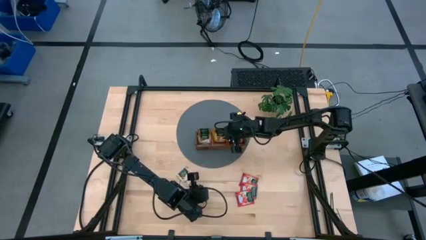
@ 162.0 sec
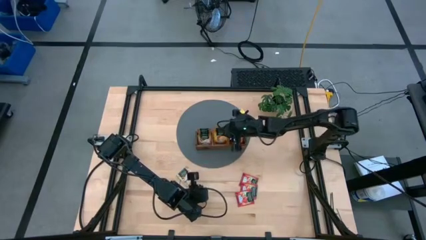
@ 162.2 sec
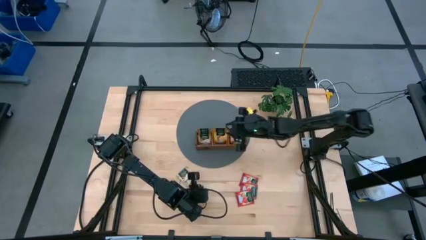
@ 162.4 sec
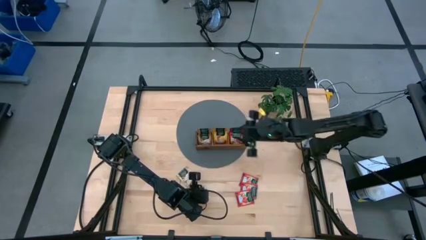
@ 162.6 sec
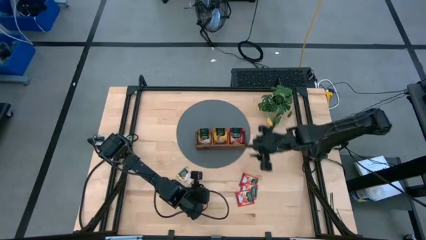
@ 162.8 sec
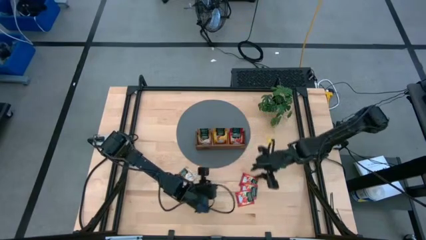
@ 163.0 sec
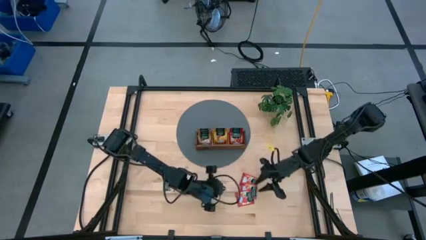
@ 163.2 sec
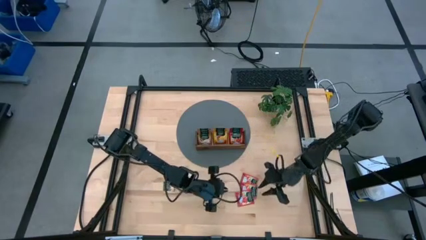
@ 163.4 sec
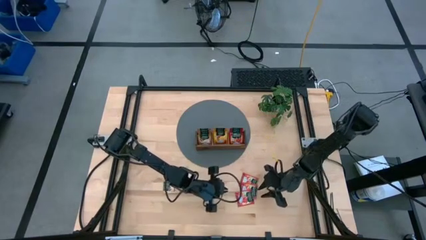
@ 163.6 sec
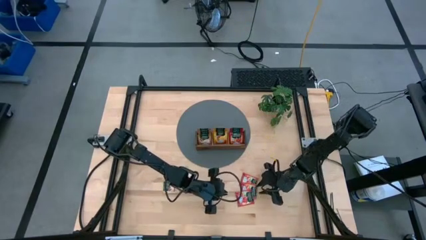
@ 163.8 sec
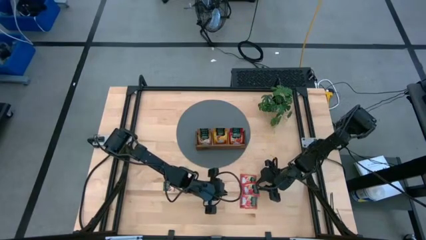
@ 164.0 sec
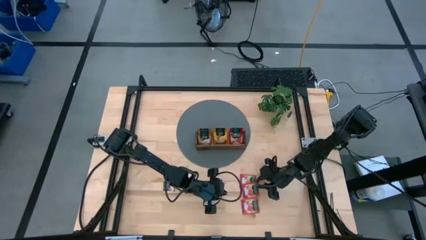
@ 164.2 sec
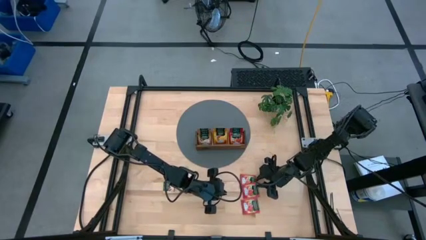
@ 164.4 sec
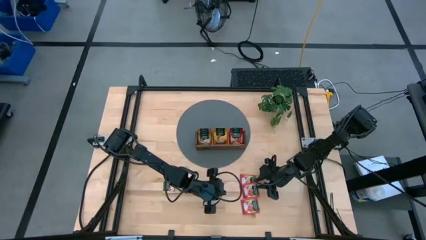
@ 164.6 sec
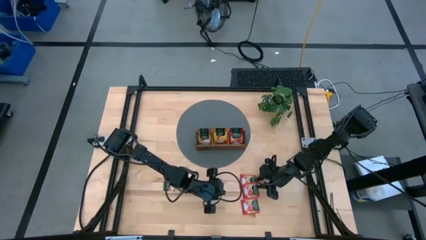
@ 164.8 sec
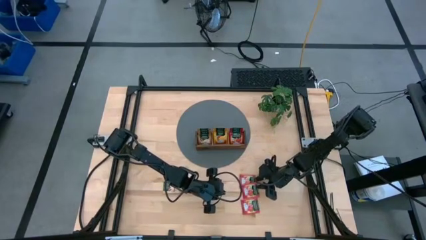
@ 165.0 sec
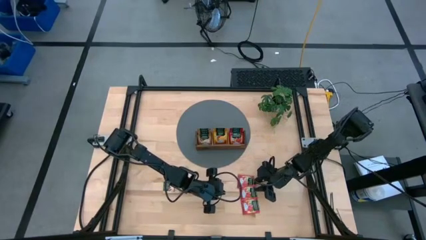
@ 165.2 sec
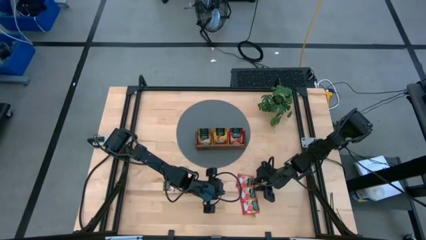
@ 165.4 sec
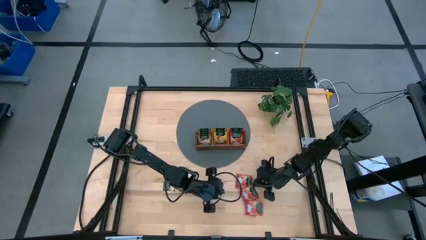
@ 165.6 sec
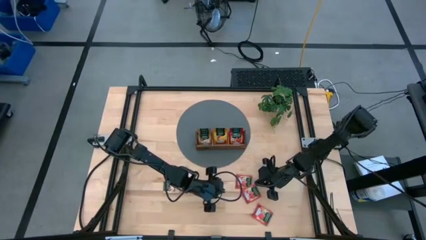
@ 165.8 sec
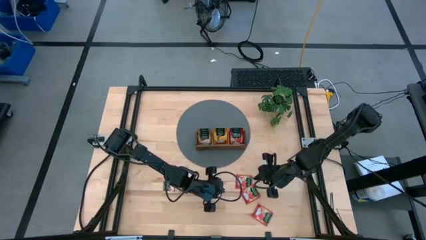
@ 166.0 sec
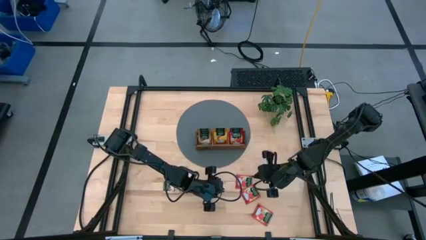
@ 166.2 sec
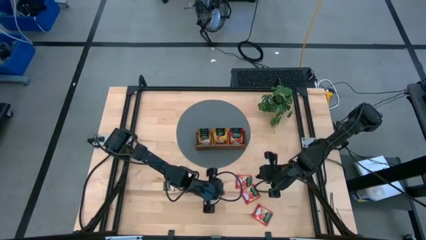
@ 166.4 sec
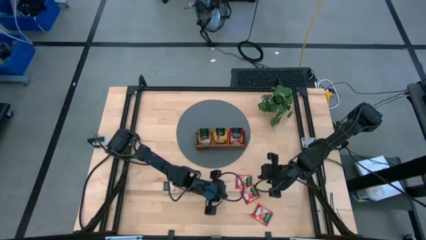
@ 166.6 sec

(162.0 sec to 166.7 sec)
Task: Pick & Place Tea
Put the red tea bag into the right section of the wooden organizer

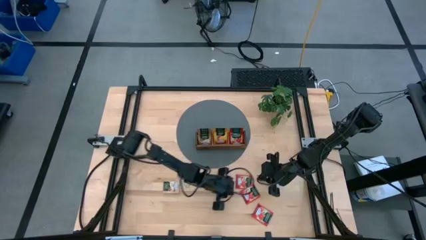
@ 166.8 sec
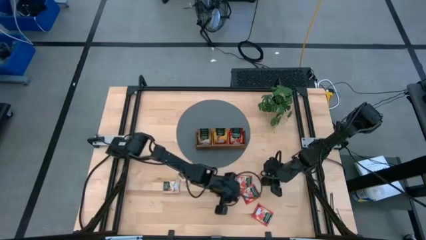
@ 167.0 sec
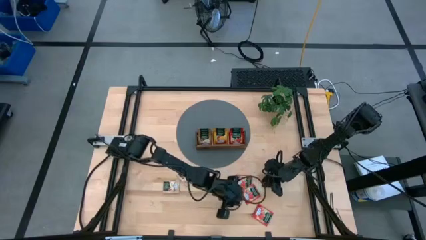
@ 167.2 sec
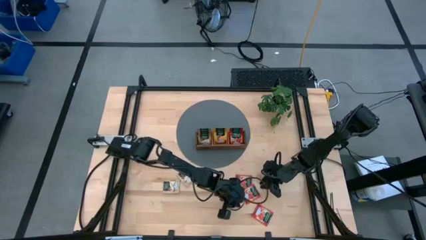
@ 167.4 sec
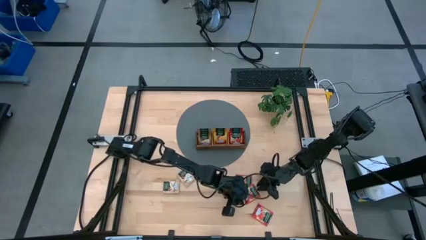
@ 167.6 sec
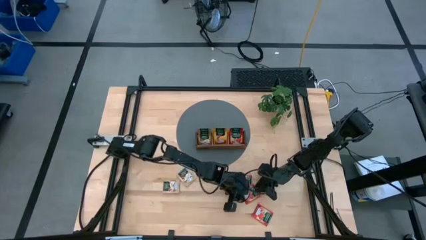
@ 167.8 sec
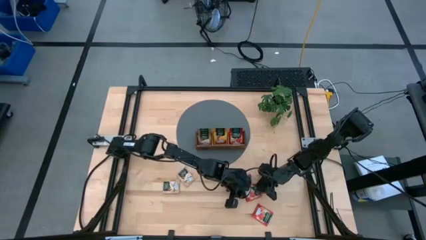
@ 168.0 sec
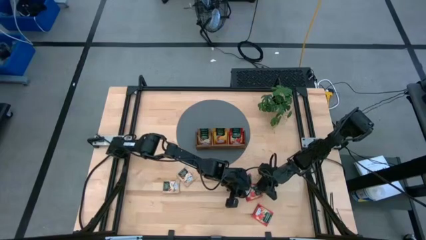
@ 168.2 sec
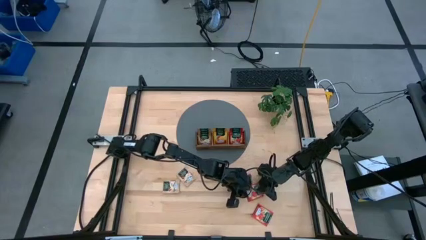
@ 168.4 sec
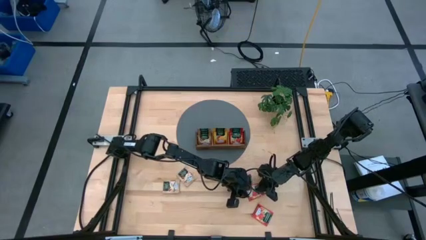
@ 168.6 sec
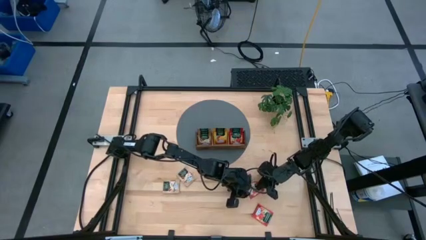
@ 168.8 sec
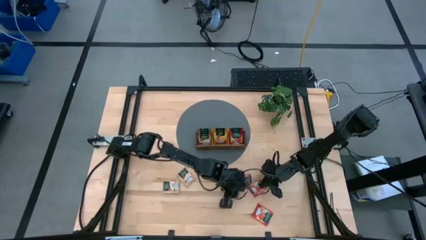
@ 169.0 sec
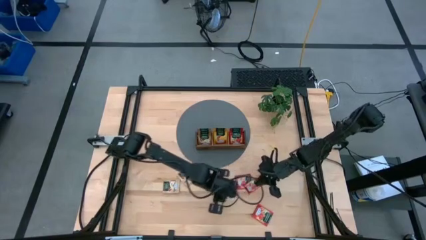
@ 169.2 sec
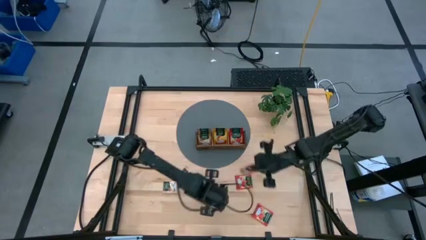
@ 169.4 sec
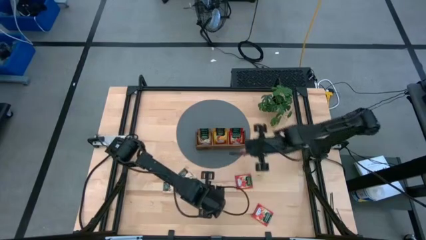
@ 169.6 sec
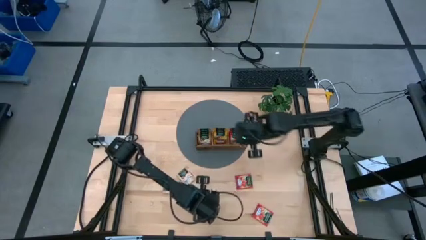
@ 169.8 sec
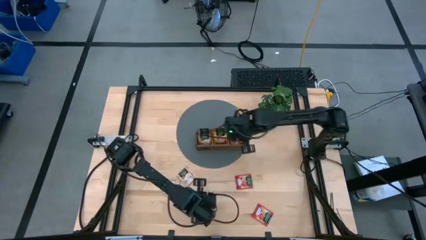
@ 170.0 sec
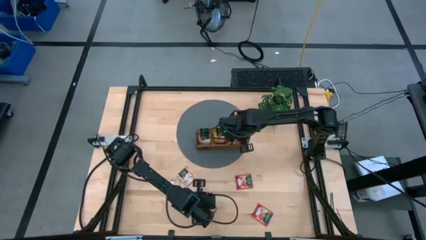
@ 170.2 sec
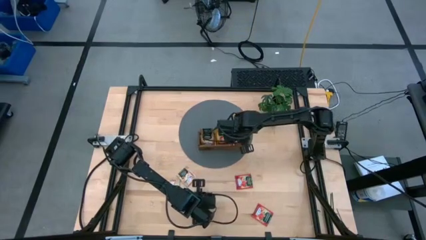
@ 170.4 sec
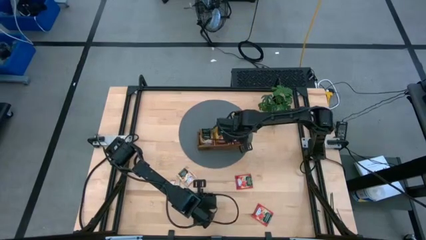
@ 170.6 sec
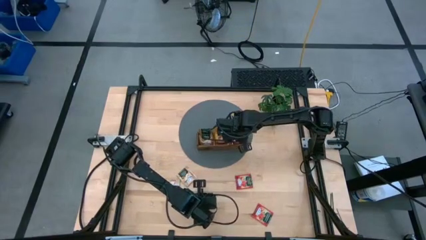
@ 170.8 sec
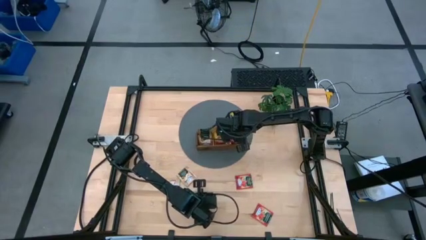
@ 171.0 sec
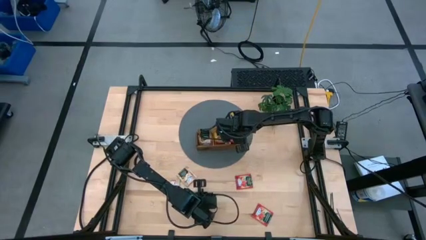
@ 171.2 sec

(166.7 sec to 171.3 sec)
Put the red tea bag into the right section of the wooden organizer

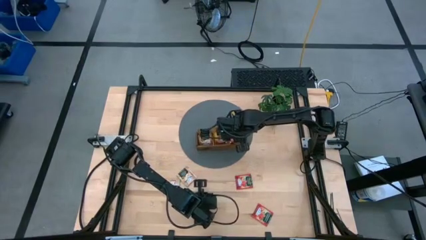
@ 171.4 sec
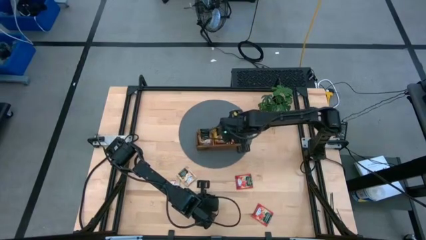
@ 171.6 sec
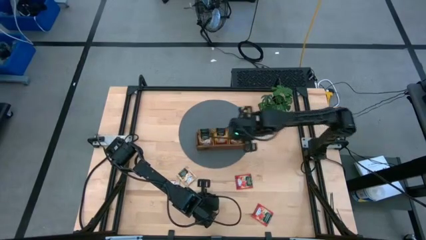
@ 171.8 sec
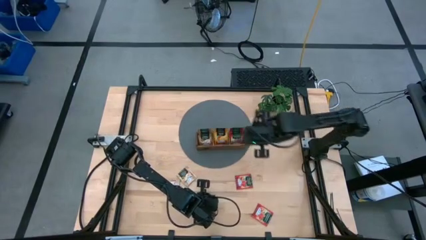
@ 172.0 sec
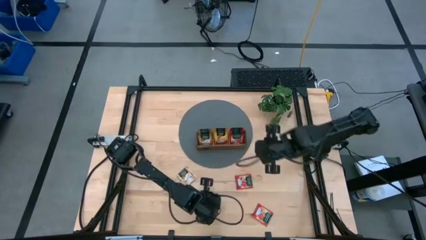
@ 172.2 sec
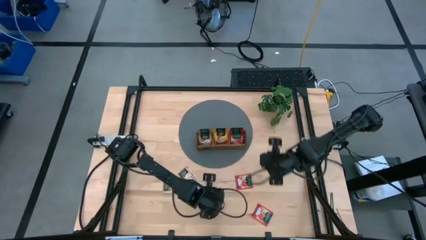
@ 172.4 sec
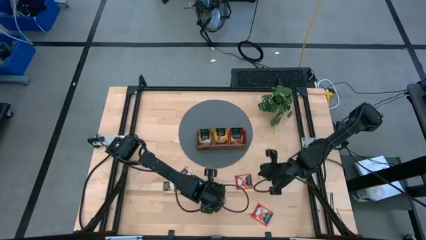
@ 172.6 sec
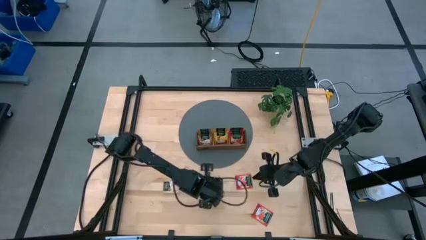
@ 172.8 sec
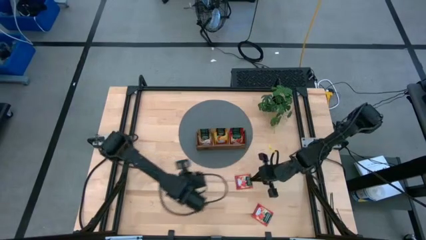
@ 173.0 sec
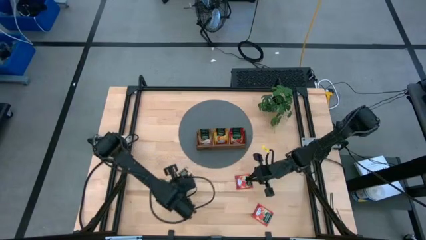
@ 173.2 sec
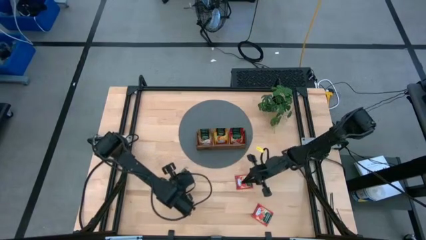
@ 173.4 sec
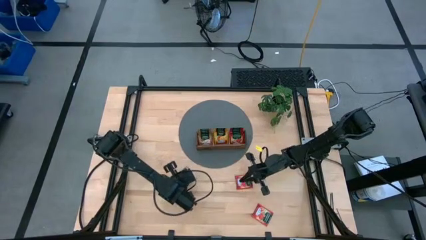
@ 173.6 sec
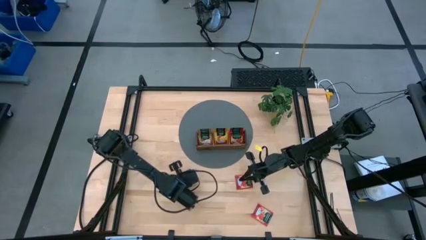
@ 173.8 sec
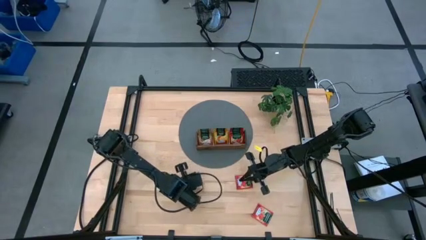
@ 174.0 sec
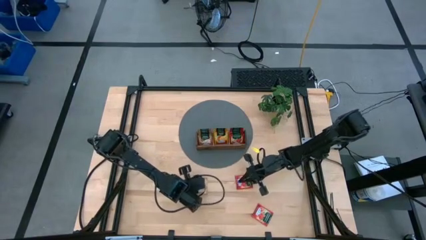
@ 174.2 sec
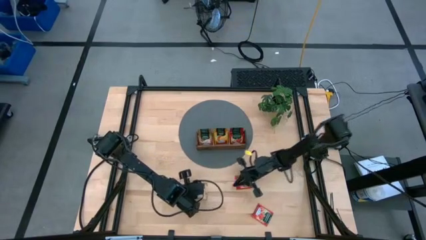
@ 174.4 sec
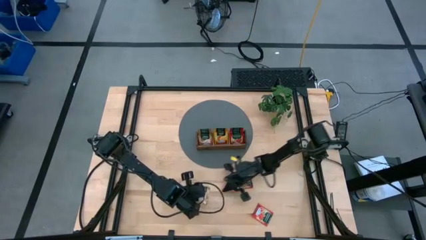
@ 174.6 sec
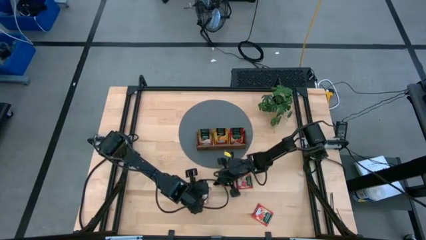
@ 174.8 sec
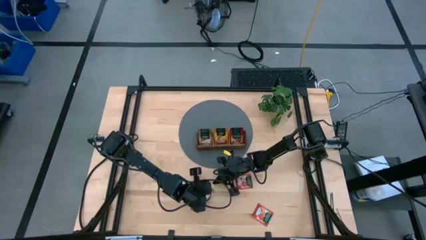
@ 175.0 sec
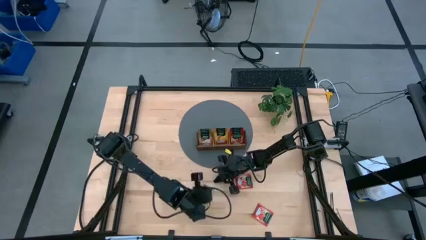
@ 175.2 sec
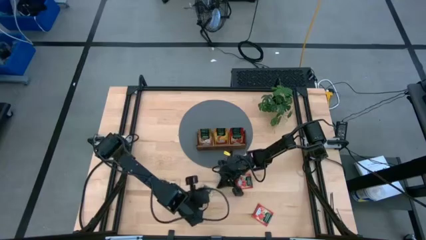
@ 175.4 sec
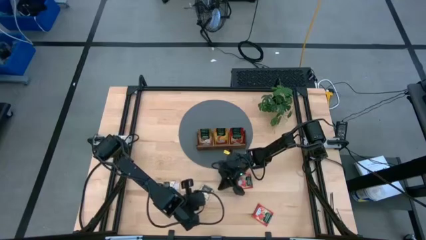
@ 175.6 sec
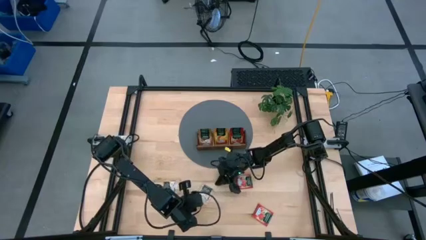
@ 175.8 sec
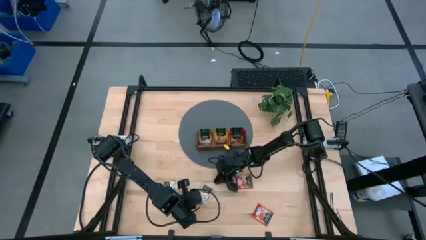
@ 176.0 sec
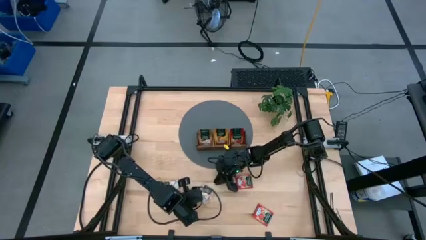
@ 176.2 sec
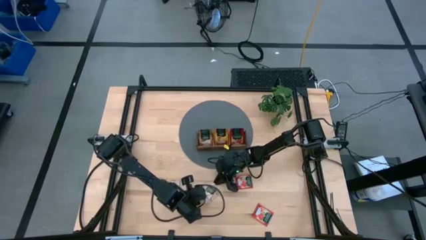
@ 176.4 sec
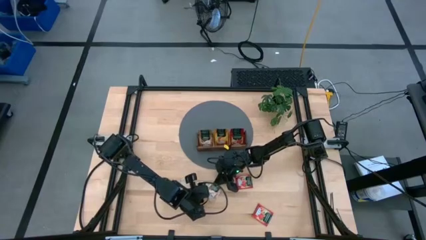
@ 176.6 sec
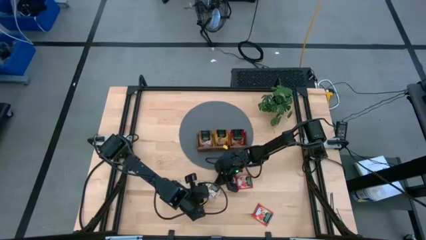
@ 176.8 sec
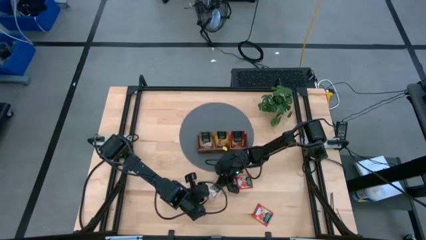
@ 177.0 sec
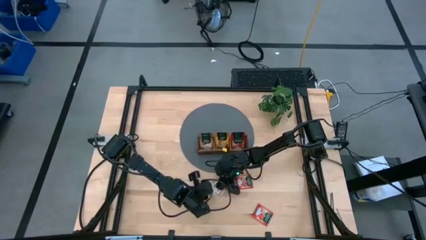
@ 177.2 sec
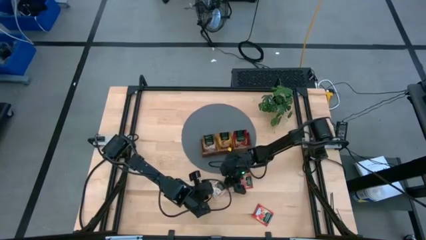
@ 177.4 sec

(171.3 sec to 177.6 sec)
Put the brown tea bag into the left section of the wooden organizer
